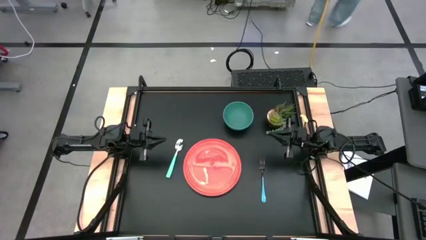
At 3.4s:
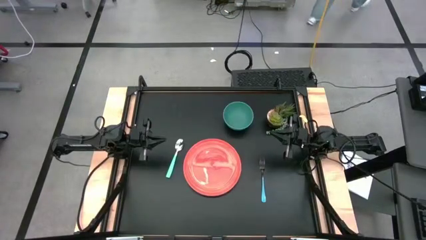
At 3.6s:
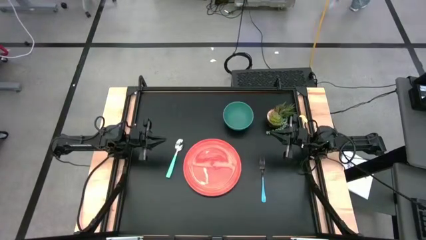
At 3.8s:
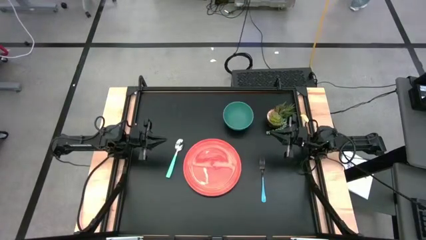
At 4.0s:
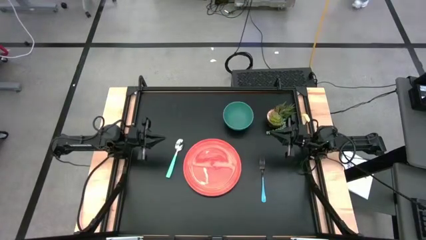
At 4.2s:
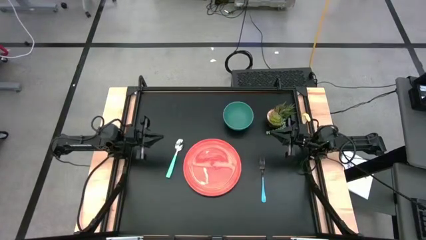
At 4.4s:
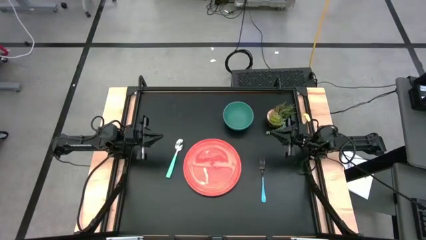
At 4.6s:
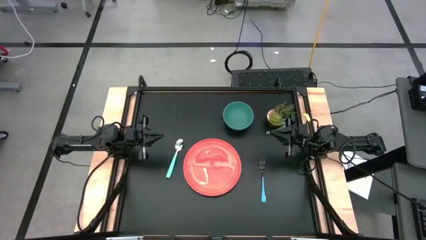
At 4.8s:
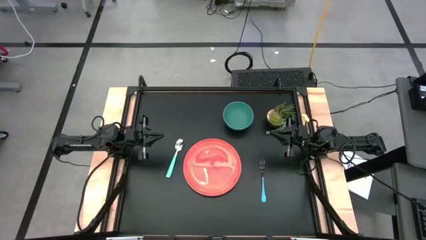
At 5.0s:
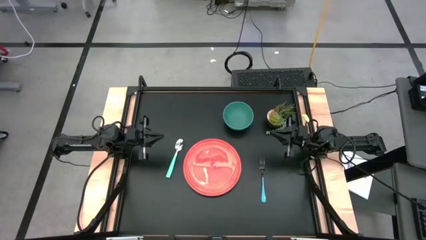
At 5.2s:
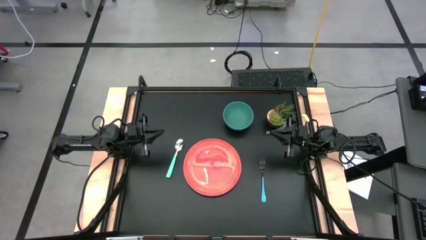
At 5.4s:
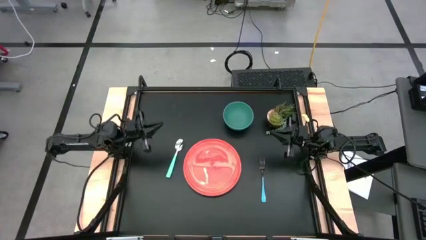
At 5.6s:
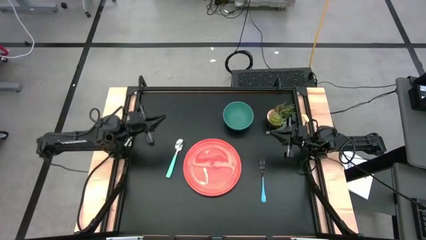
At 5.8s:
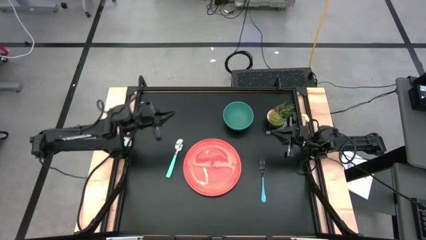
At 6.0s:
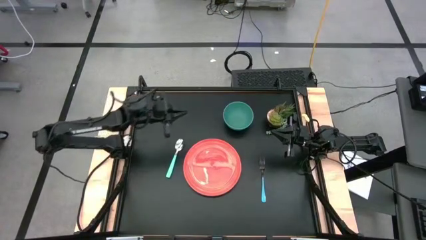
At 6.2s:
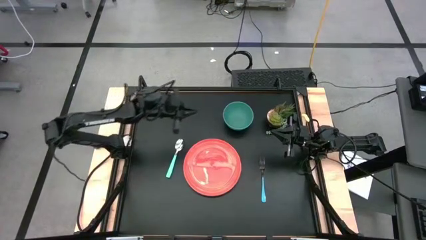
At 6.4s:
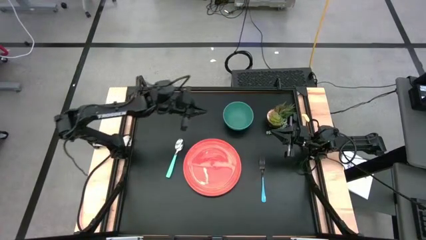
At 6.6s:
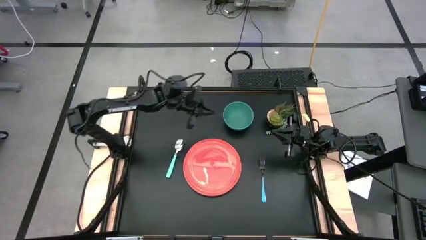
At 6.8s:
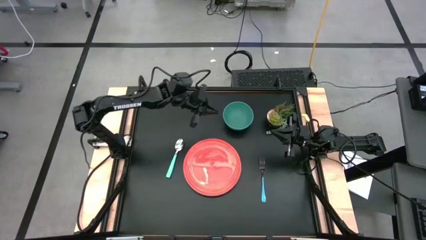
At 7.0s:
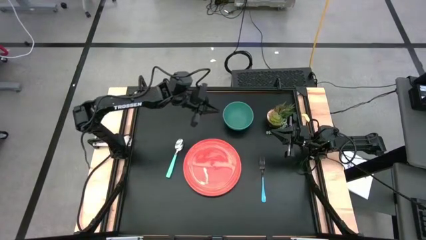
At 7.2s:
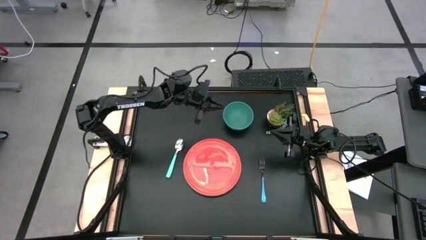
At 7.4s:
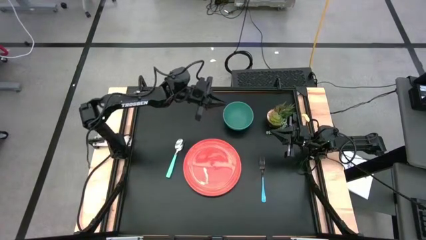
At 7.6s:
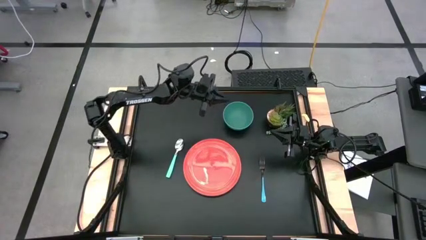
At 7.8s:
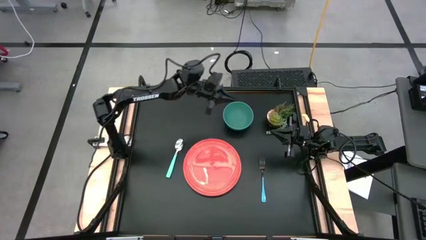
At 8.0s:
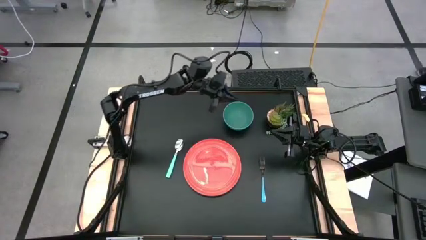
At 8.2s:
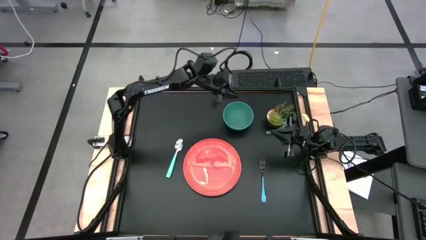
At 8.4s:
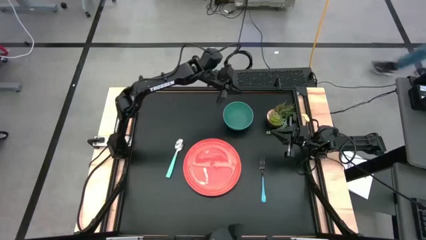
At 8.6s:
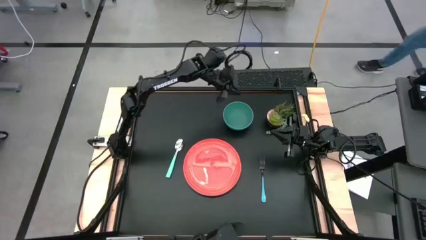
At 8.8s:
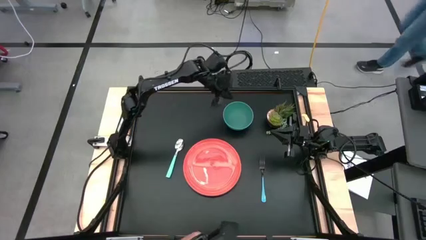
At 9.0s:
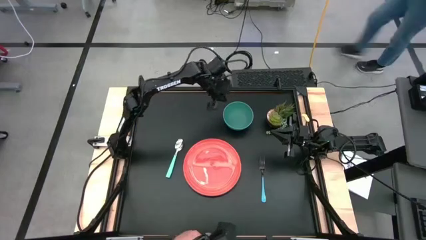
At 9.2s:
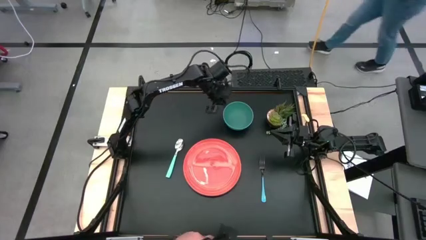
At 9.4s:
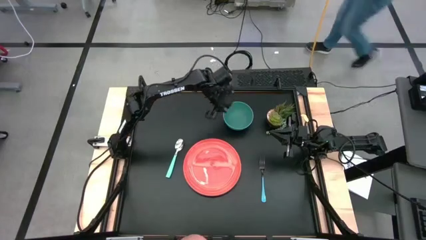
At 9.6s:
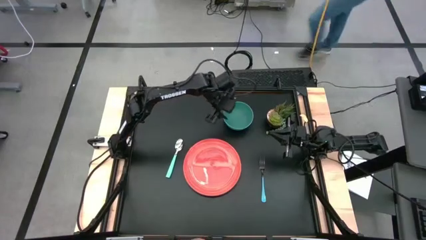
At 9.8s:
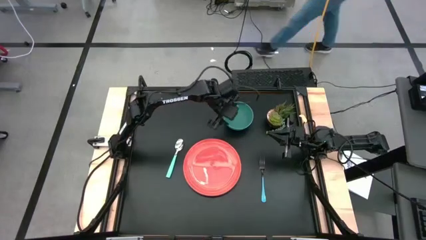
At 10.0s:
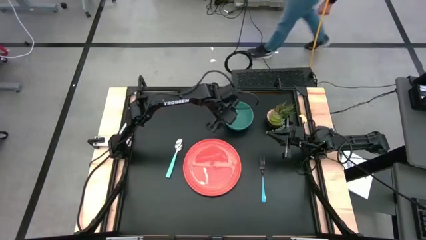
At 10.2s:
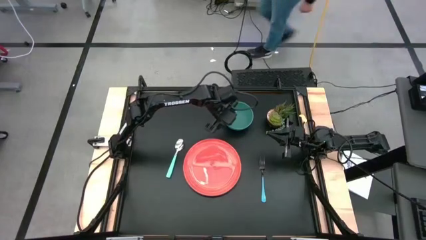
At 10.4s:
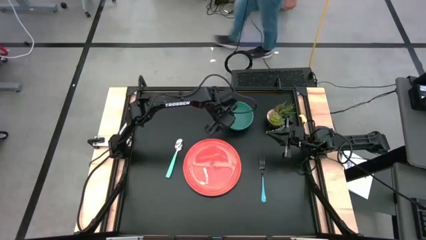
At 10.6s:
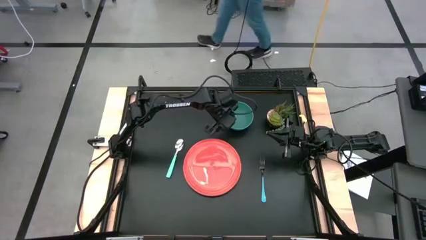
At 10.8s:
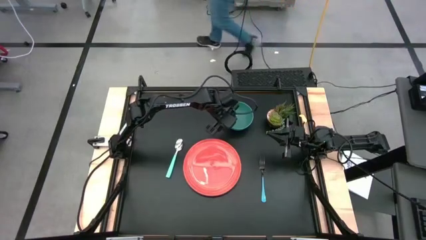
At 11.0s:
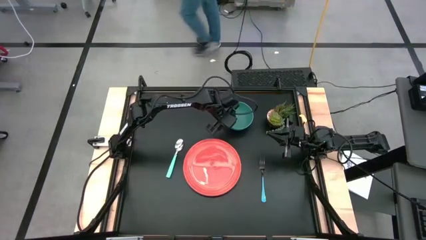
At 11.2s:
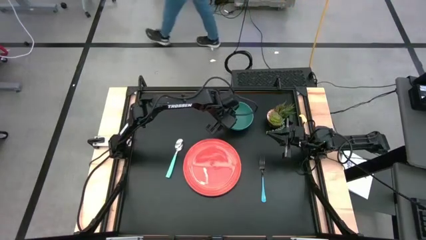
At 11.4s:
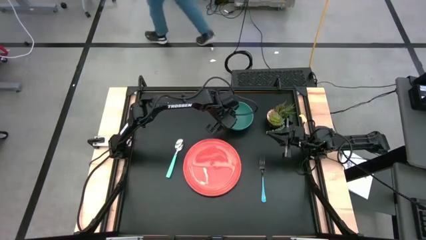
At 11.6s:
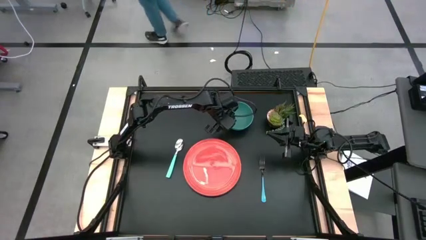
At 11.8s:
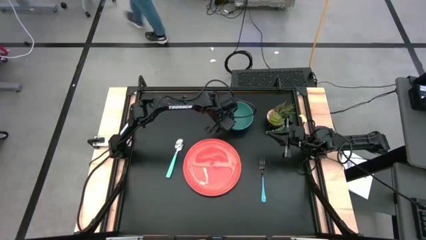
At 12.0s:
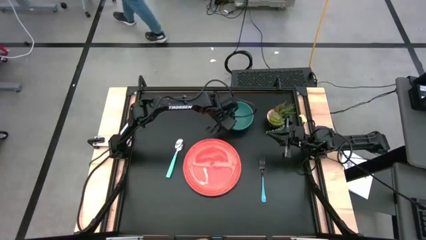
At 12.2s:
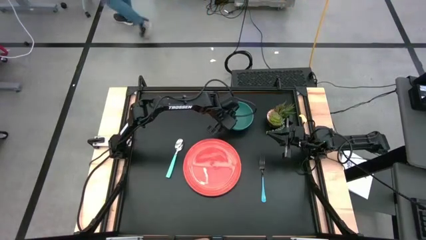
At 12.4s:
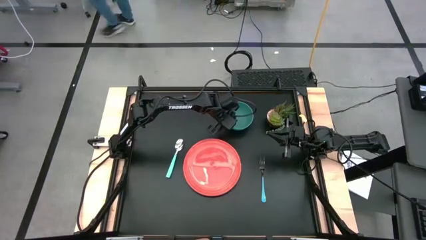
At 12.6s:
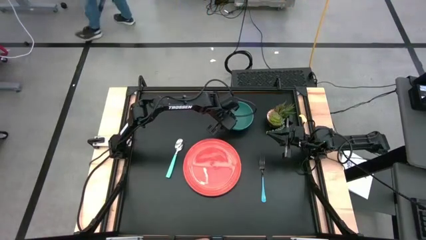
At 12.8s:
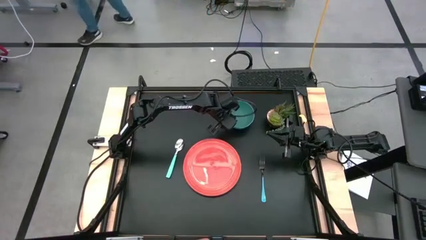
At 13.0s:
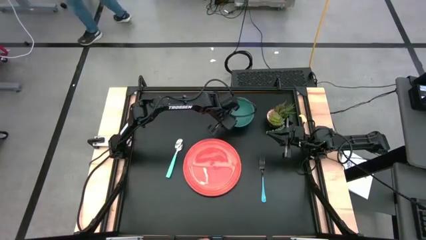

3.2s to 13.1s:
Task: Set table place
Put the green bowl on top of the orange plate

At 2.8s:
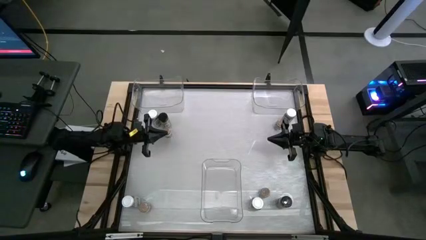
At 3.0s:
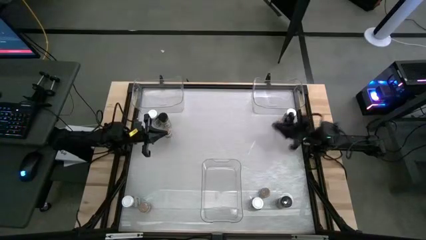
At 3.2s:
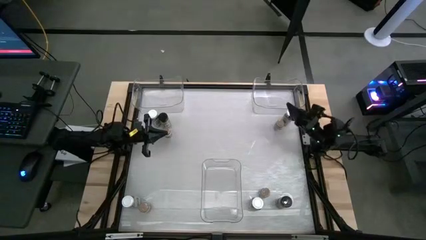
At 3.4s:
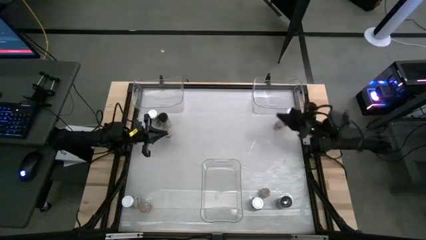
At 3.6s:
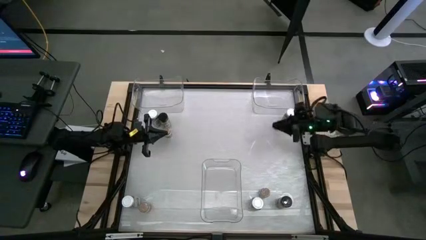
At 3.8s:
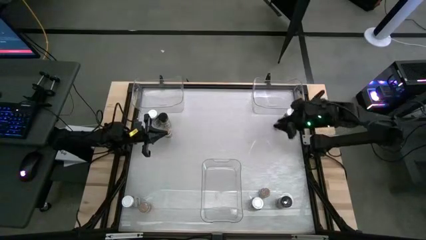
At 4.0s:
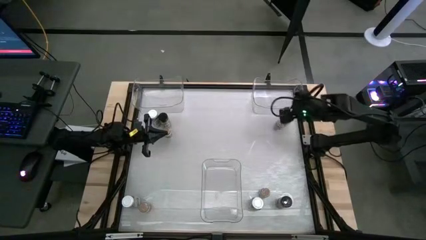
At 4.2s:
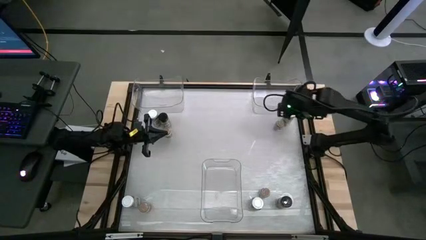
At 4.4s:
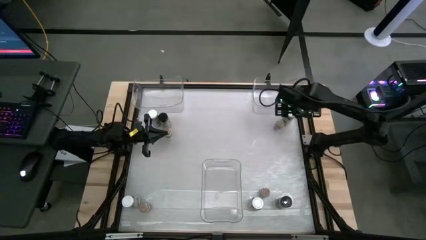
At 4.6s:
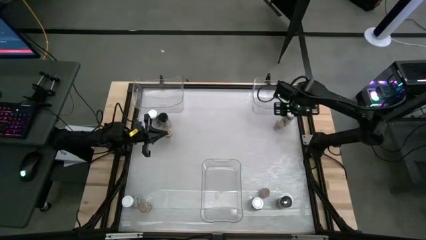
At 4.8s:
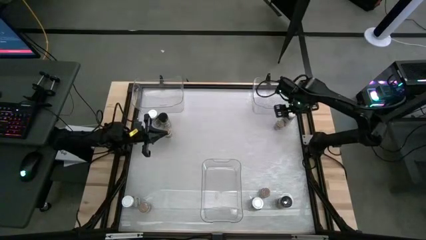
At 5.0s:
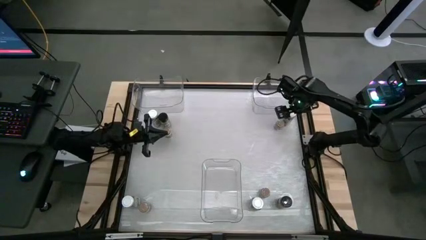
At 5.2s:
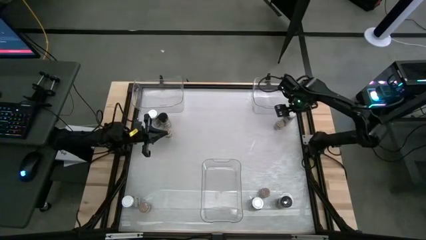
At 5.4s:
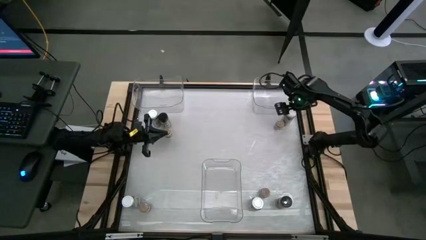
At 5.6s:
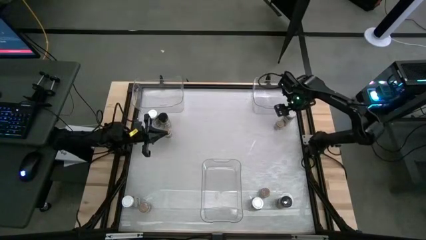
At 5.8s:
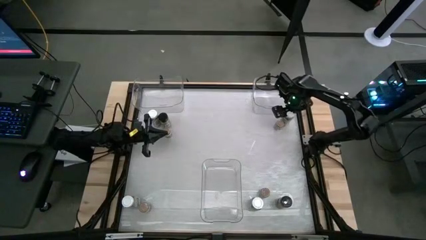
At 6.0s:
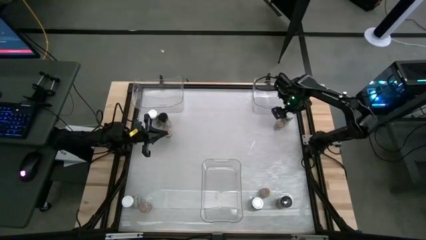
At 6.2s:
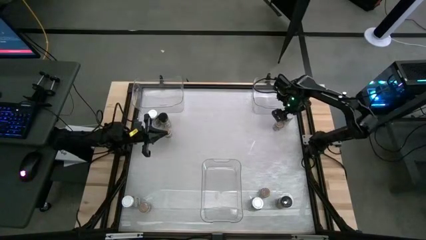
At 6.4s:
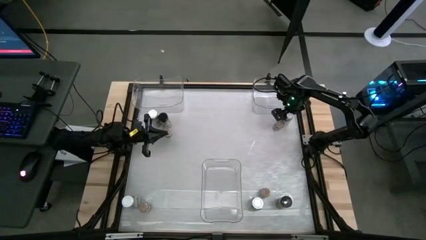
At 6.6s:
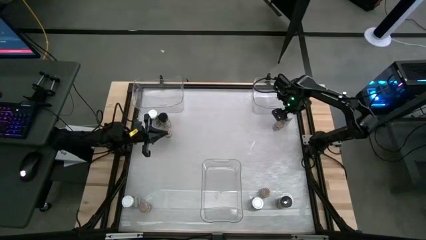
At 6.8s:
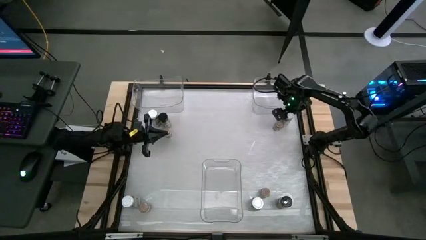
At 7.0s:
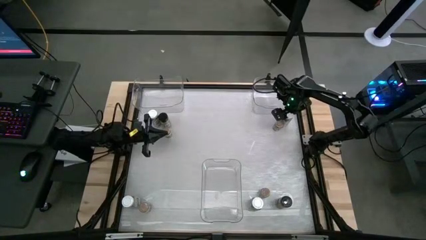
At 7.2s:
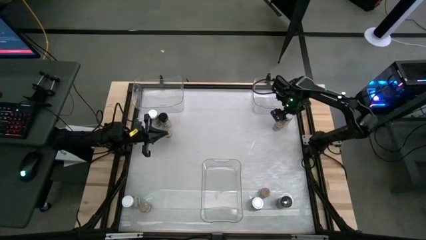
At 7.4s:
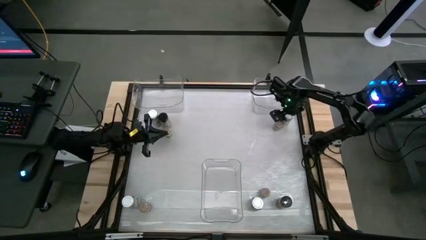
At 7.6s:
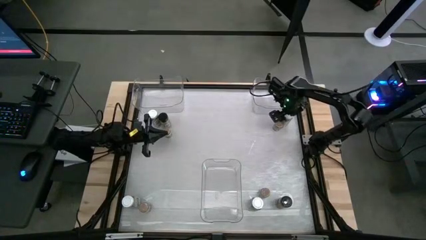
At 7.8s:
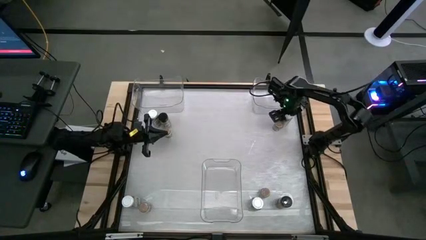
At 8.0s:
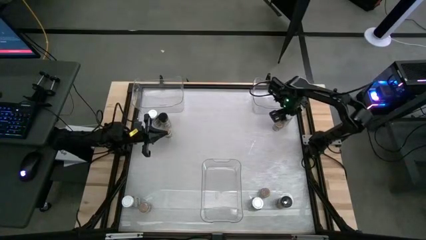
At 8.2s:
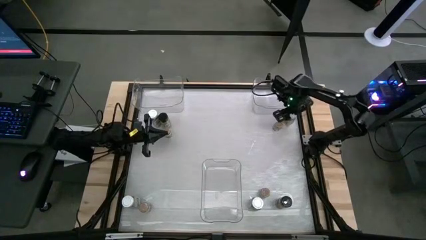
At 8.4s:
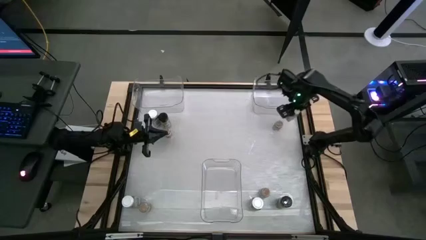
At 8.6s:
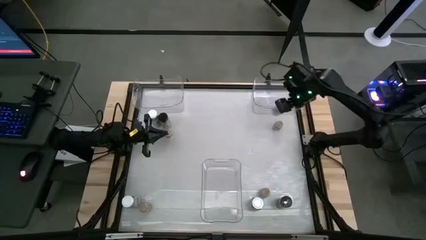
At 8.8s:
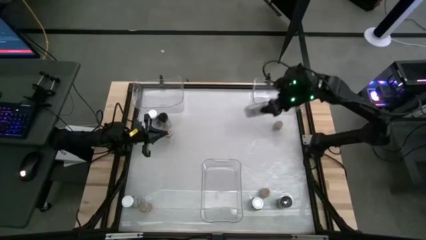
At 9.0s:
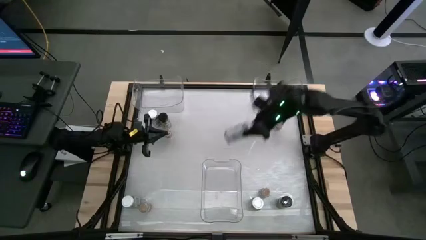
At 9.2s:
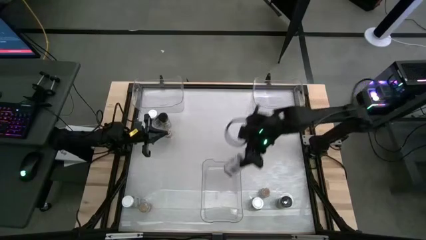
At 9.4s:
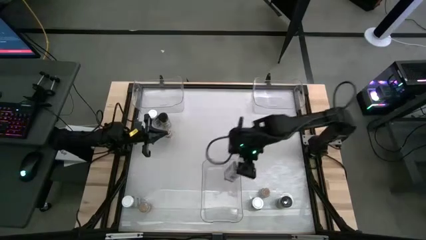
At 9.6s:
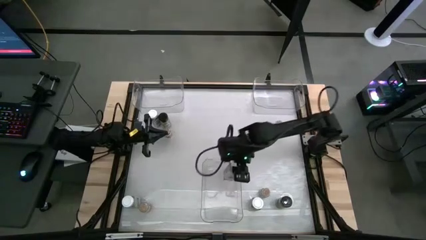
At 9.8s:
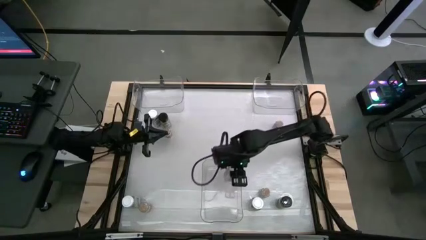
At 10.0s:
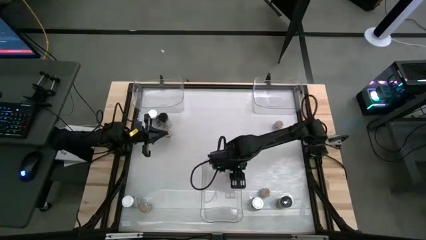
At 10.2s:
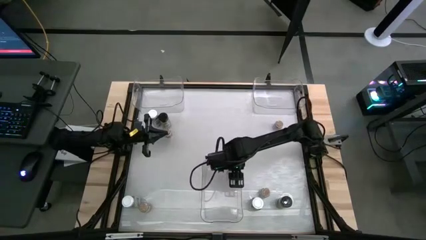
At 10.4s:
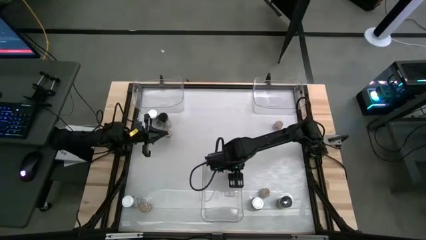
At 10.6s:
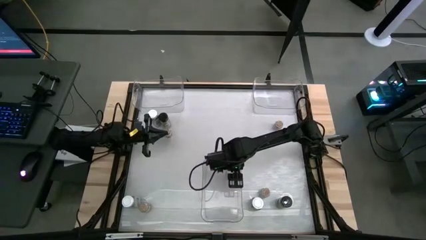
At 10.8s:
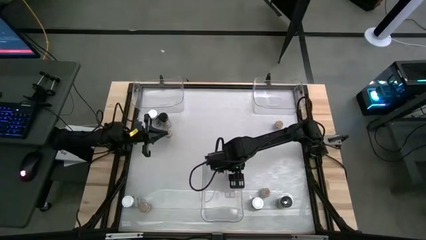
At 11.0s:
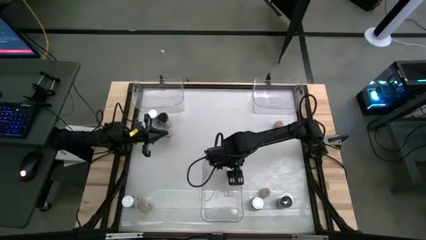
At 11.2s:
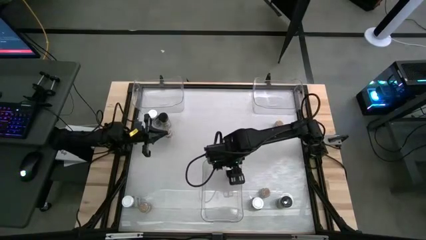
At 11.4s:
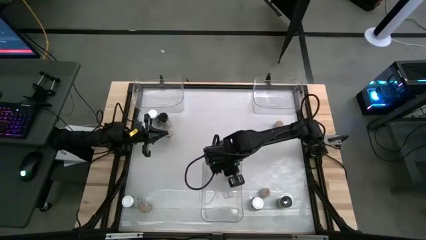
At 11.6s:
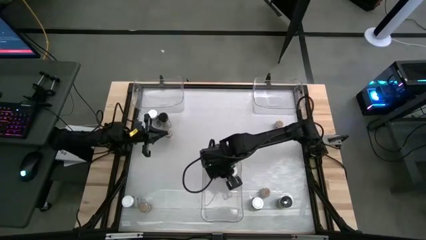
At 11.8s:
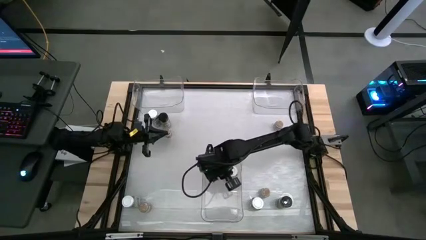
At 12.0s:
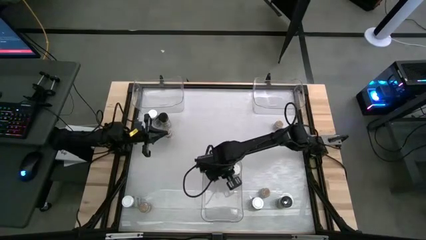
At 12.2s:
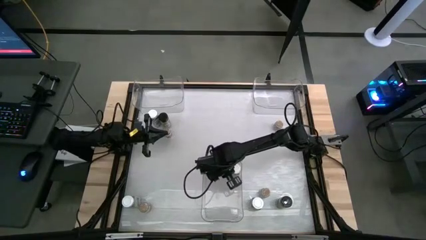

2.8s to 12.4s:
Task: Sort spices by type
Put the top right white seasoning bottle into the bottom transparent bin
